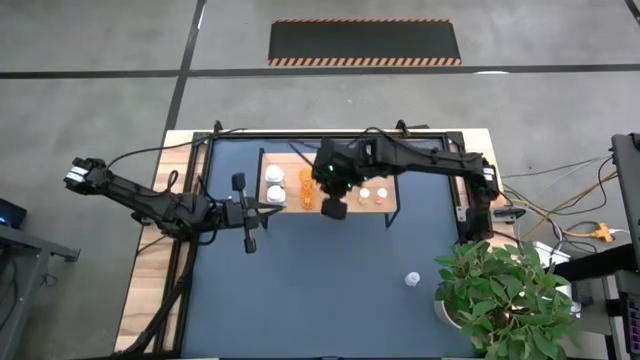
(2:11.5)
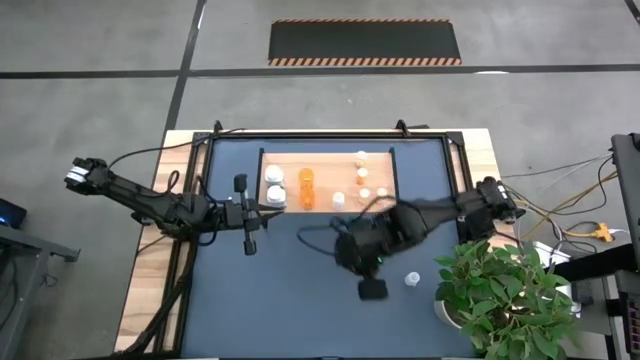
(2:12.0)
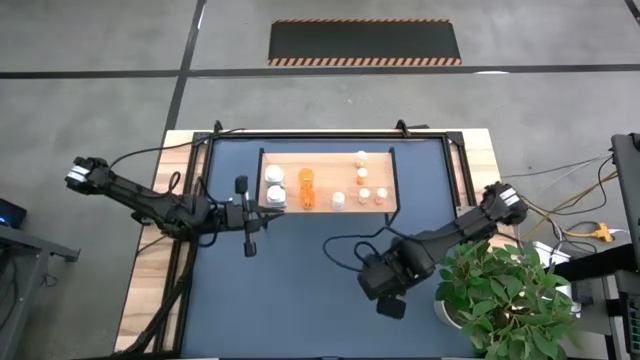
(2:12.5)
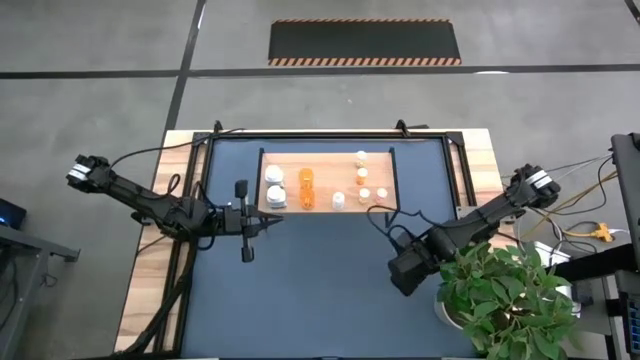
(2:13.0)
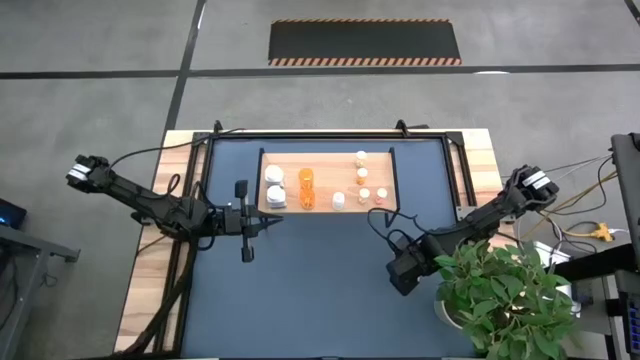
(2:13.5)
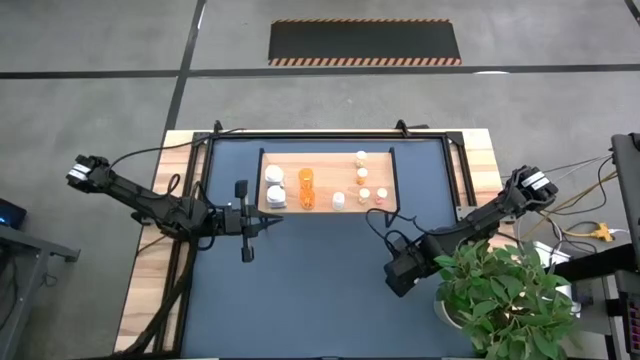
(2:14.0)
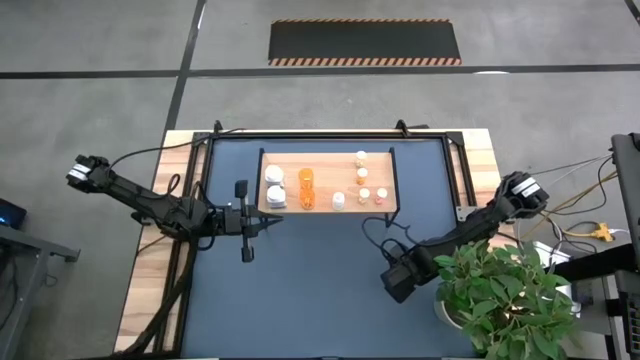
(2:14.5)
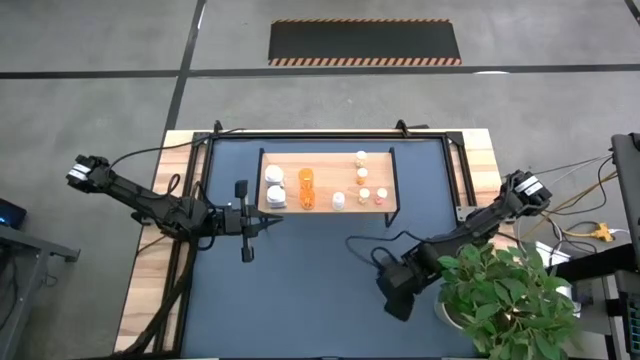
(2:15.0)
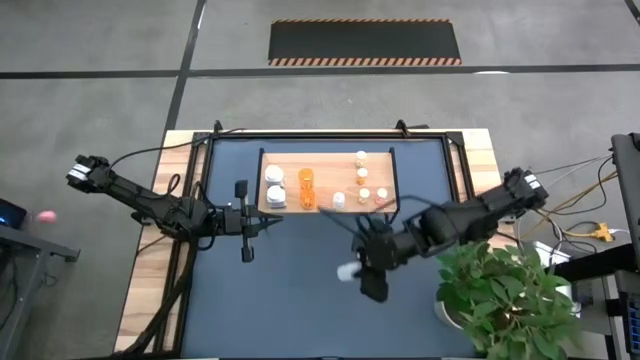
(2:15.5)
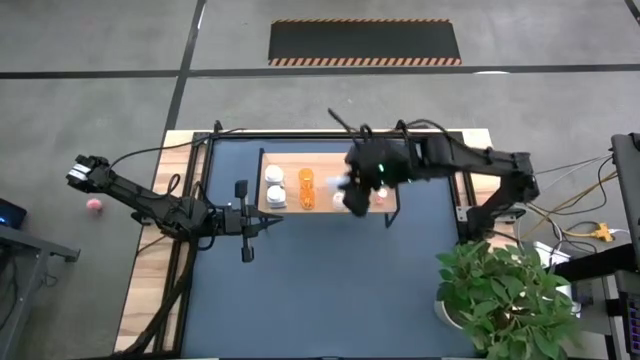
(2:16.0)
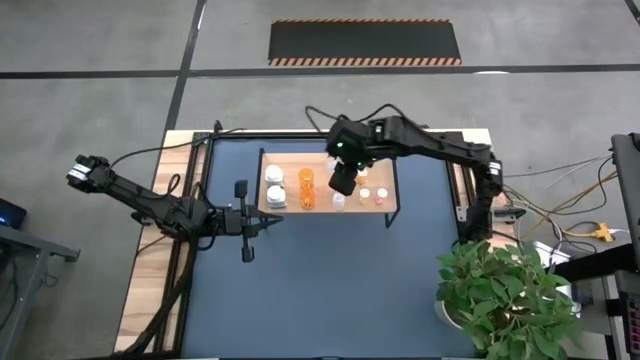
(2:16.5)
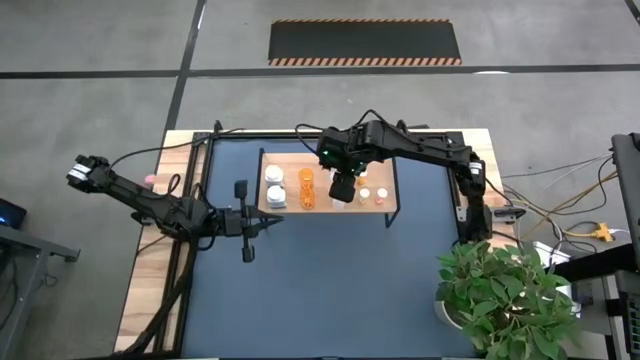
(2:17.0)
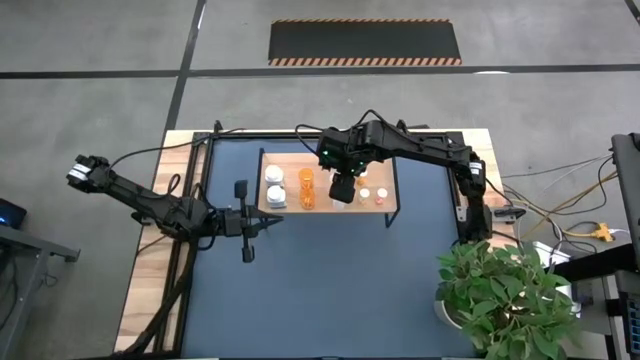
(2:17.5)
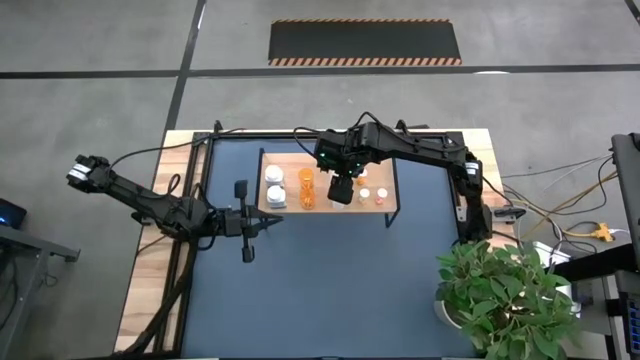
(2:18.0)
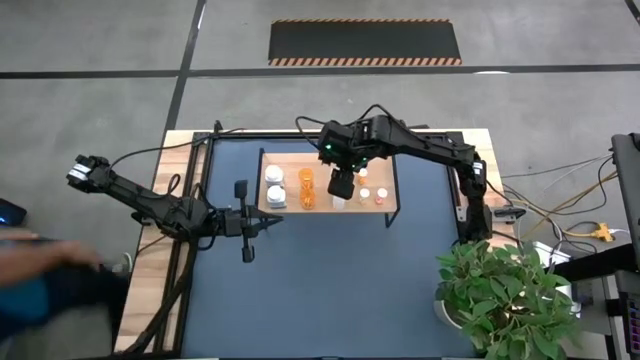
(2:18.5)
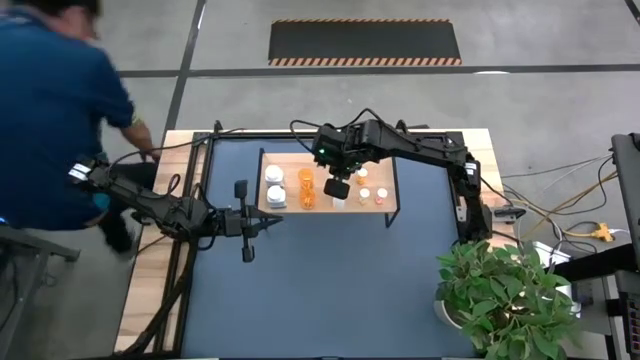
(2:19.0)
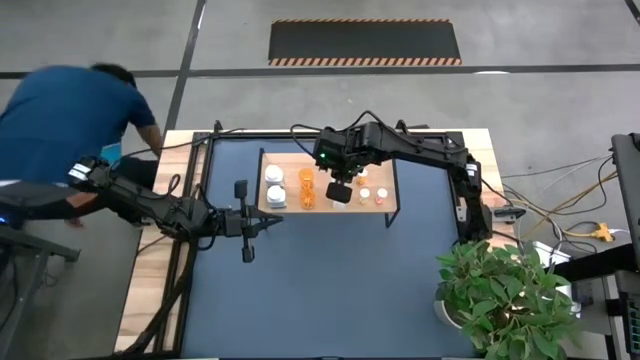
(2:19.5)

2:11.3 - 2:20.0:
Task: Pick and place medicine bottles onto shelf by color
Put the transparent bottle on the shelf

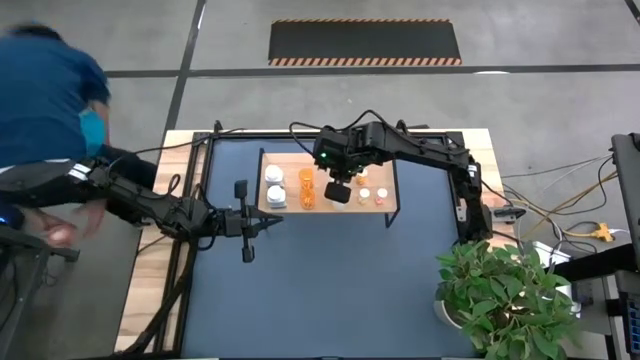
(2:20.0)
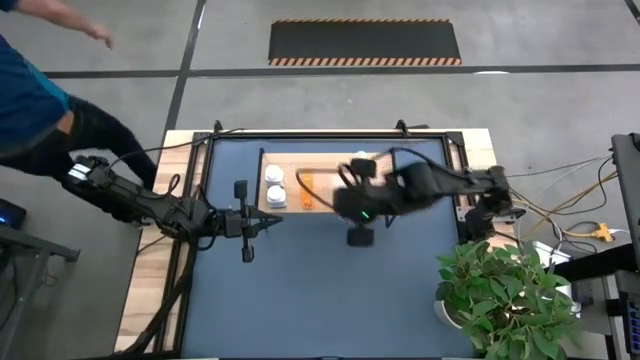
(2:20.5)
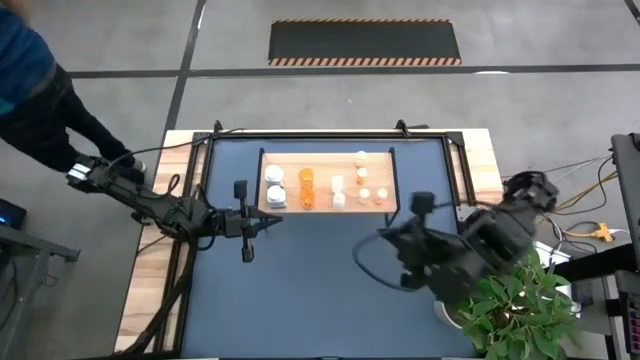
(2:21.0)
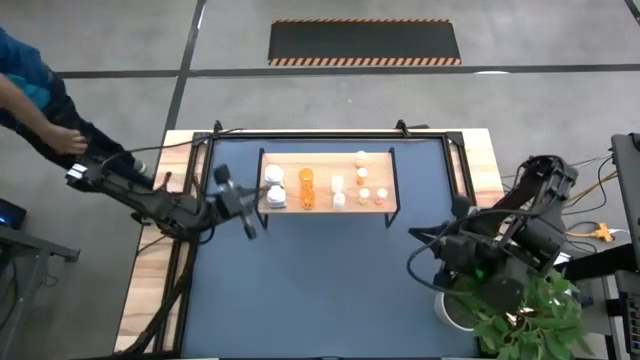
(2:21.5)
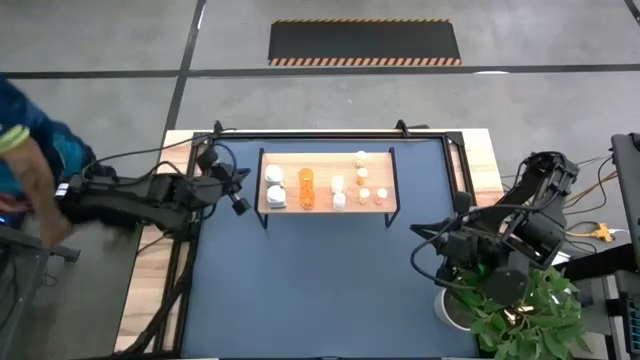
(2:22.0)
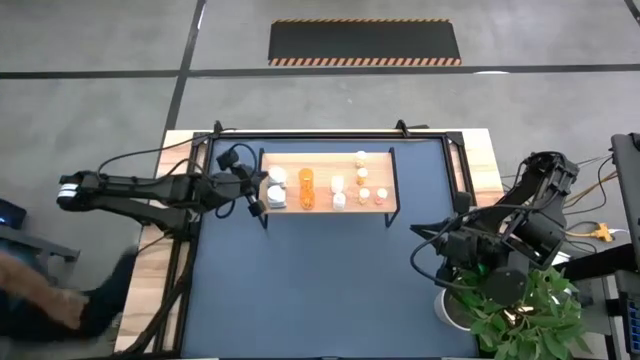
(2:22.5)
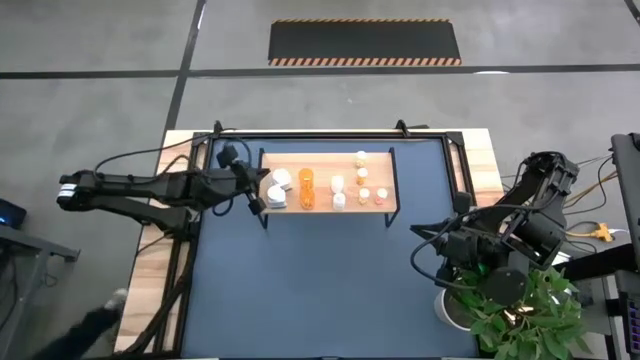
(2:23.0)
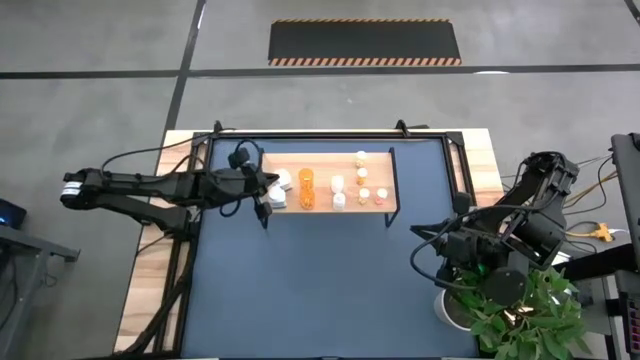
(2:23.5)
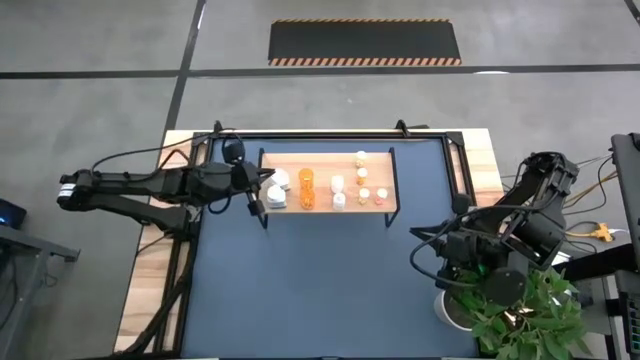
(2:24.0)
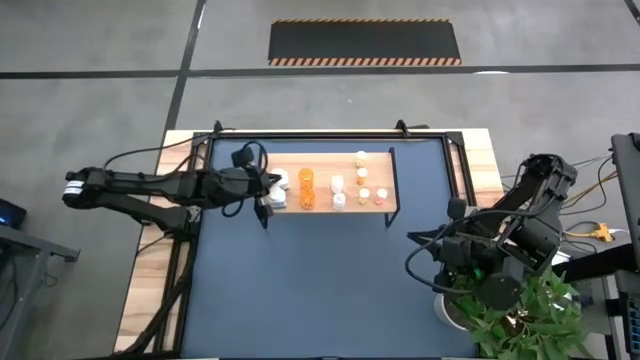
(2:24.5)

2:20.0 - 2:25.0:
Adjust the white bottle on the shelf

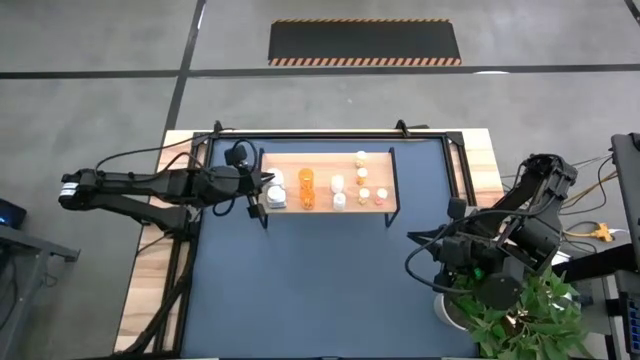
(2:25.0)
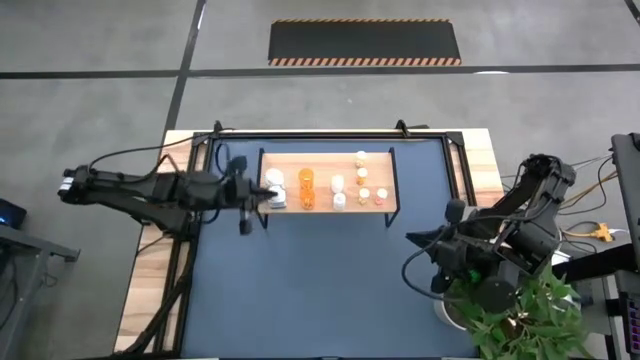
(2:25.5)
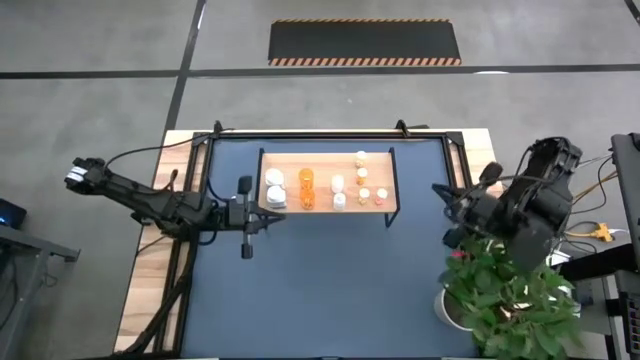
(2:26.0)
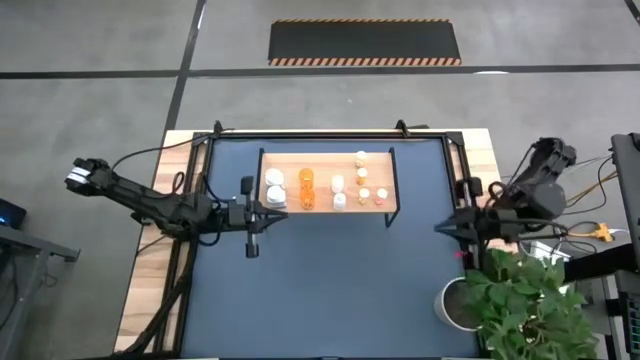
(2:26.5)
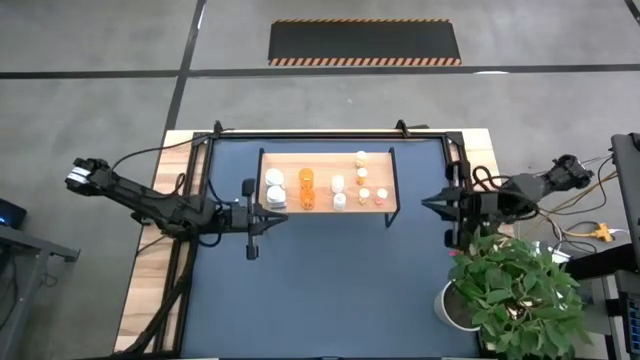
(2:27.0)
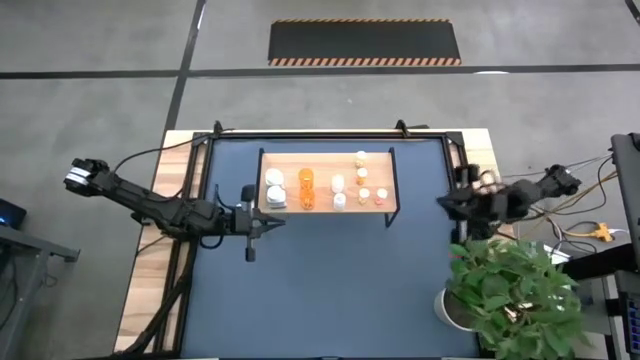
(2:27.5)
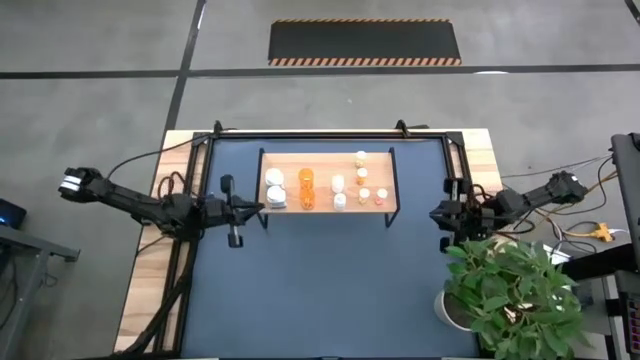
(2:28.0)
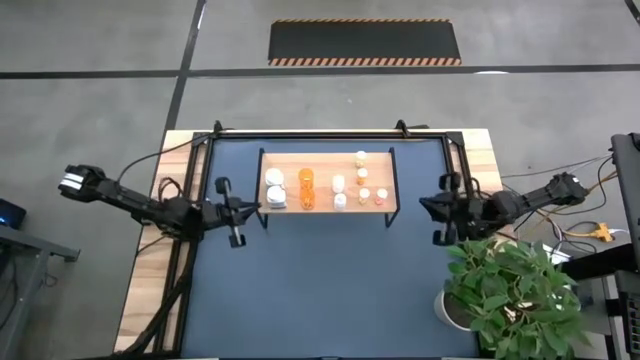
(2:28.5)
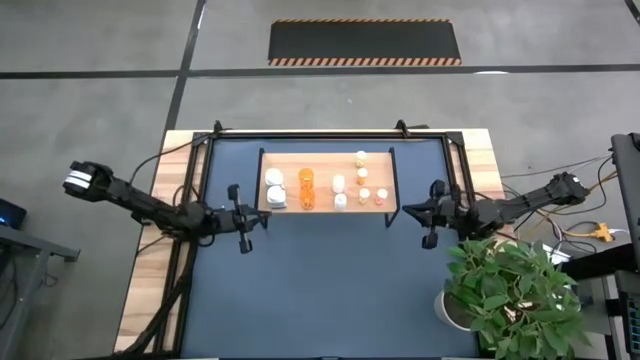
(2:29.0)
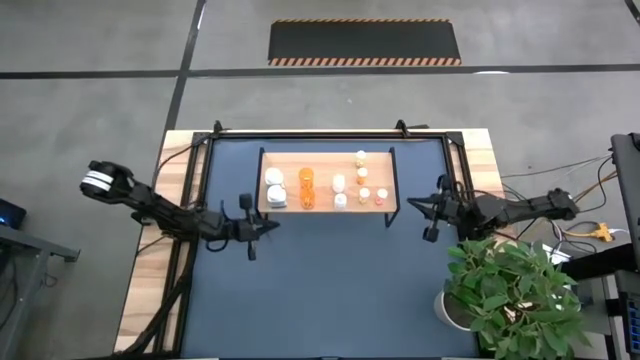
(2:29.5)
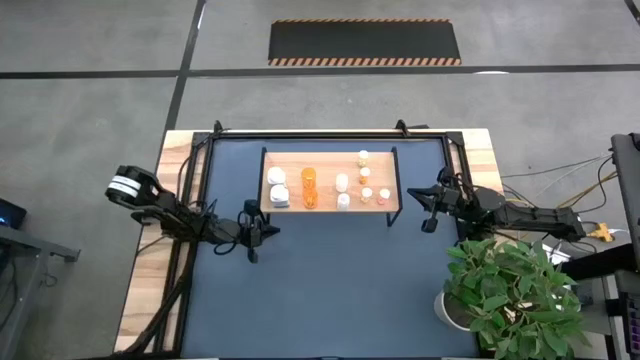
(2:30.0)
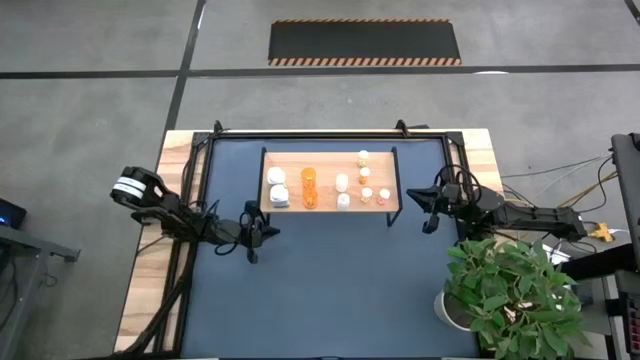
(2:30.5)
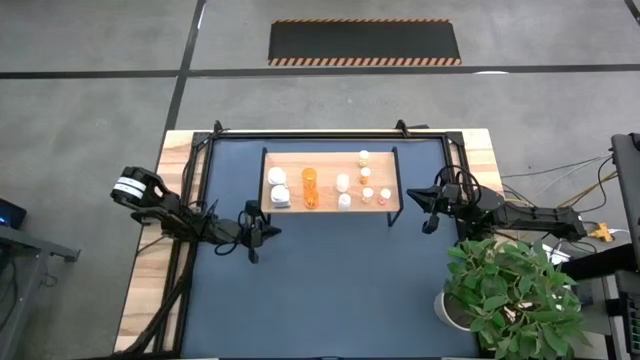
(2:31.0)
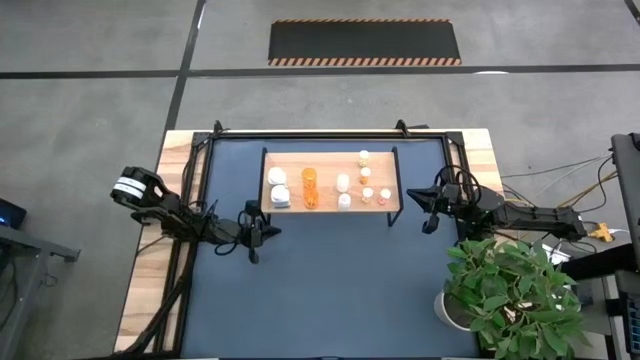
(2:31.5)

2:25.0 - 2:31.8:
Return to Home Position

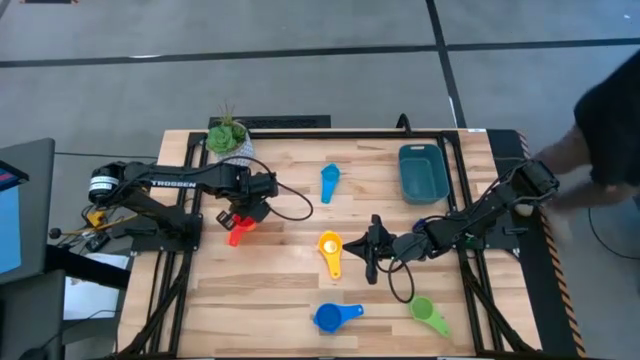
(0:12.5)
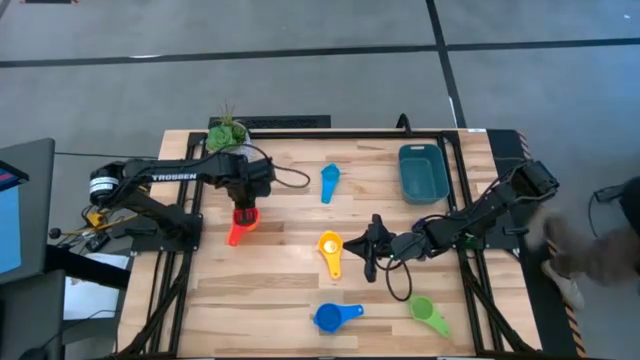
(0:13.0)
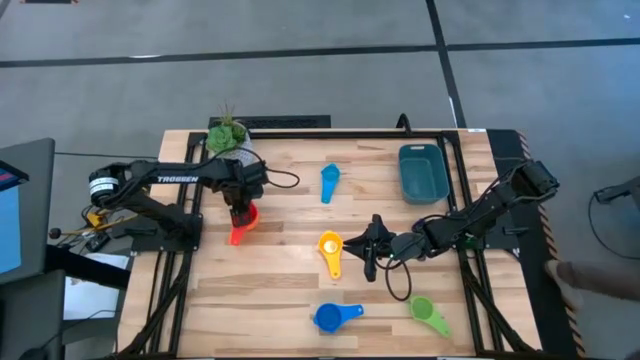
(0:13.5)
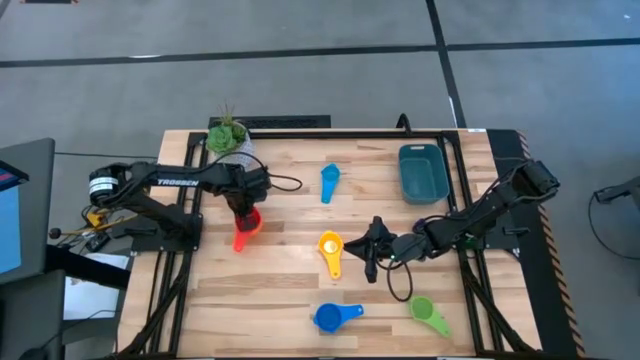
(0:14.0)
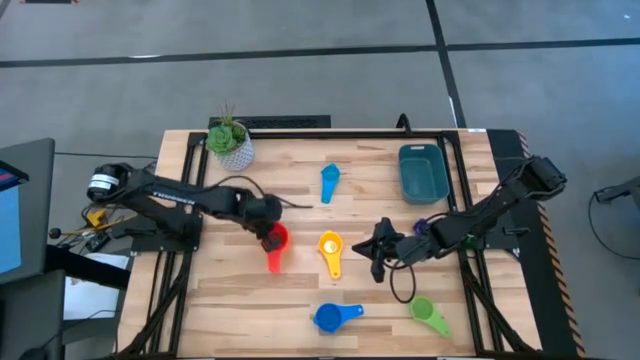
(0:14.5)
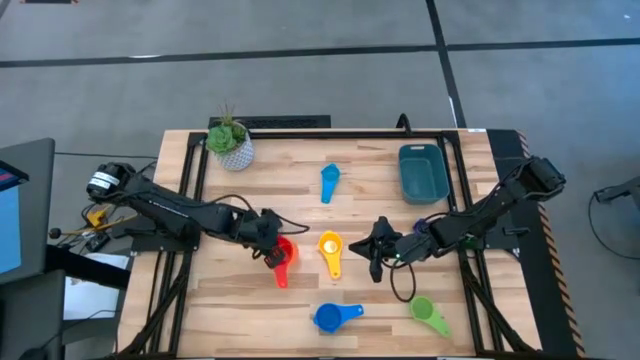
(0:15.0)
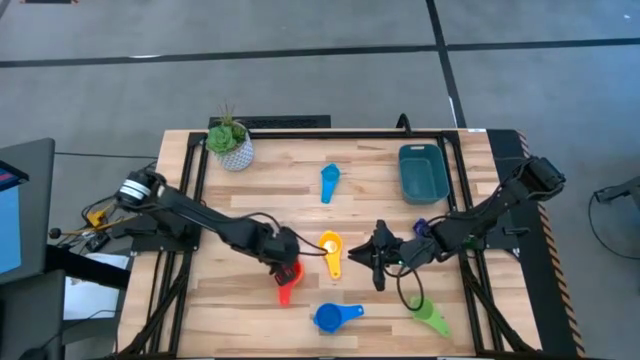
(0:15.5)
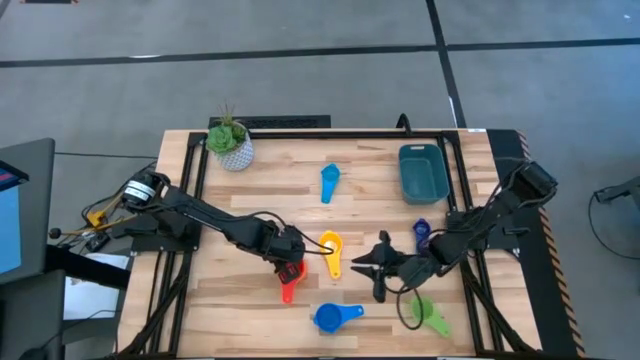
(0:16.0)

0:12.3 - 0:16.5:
Task: Nest measuring cups in basket
Move the nested measuring cups to the center of the table
